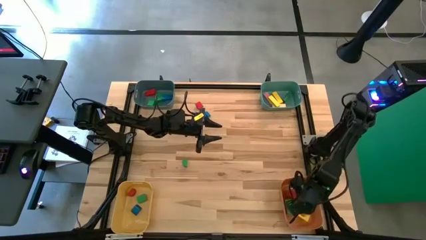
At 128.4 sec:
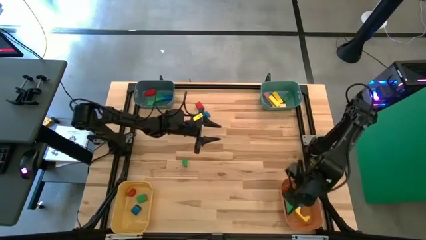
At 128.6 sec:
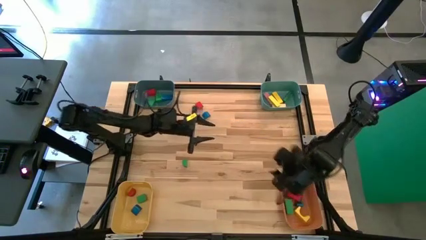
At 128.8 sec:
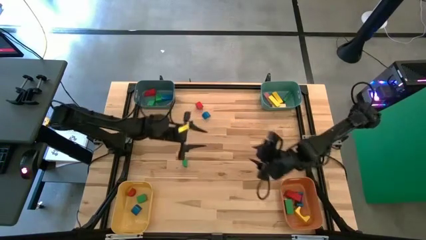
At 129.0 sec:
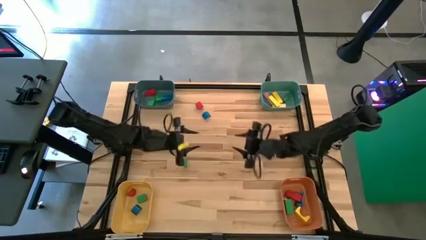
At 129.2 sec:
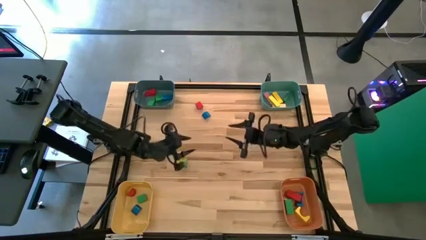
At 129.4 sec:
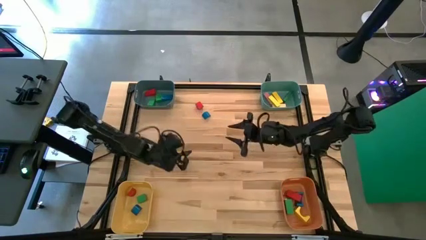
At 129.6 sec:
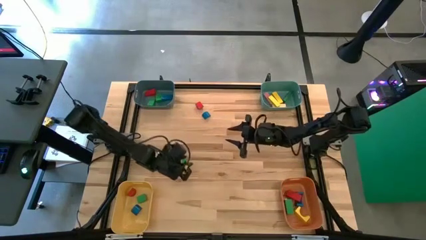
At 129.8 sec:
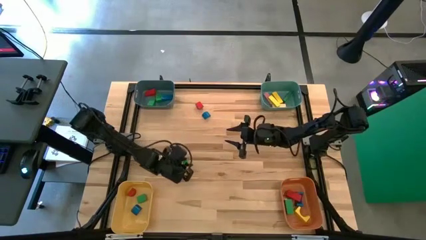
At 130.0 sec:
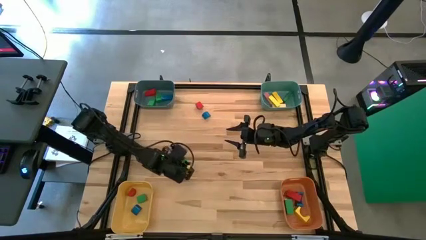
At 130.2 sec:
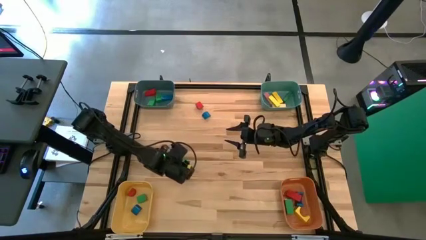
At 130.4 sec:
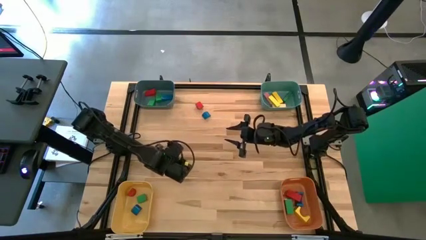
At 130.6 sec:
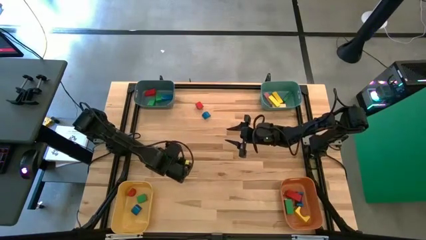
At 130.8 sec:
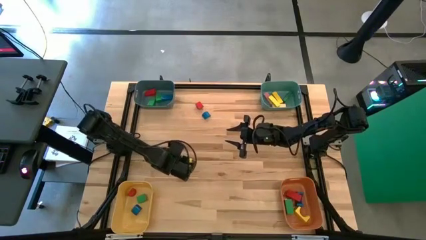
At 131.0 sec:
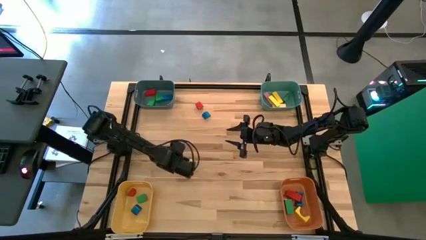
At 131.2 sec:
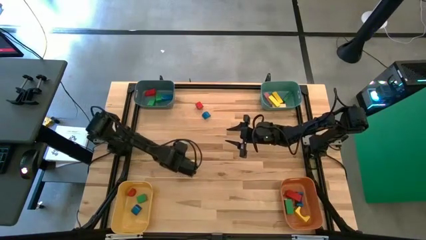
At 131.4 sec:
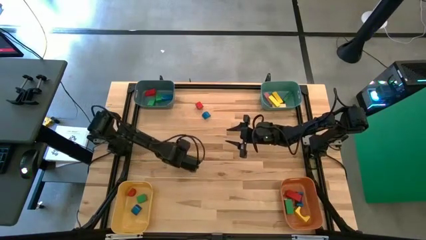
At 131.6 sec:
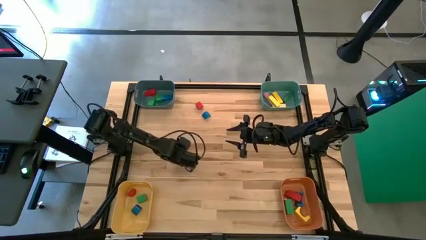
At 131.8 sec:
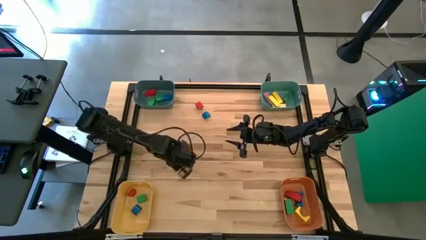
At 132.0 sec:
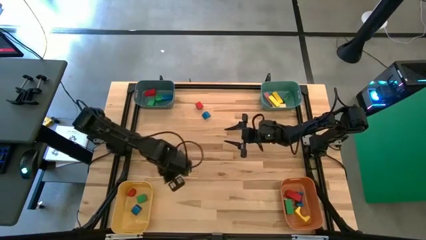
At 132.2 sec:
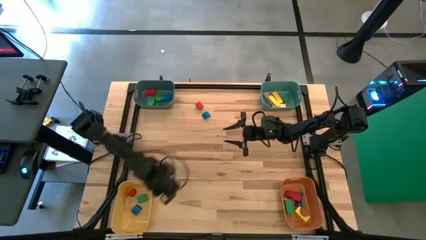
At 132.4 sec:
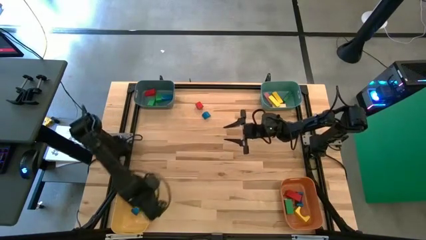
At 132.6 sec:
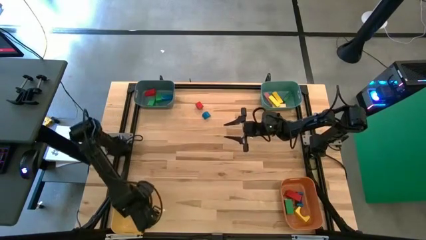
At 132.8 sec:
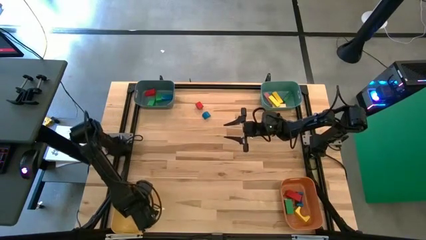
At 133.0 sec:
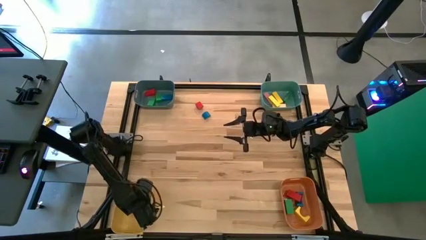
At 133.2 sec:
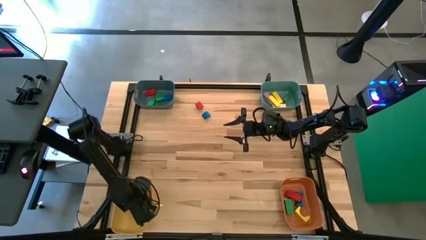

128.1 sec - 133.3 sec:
Task: Sort blocks by size
Put the green half-circle block into the yellow bin

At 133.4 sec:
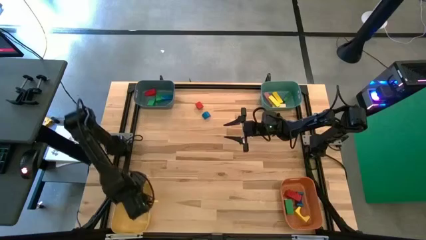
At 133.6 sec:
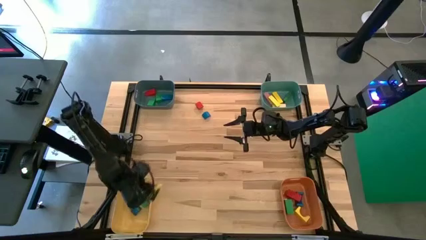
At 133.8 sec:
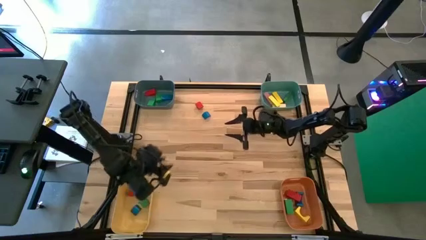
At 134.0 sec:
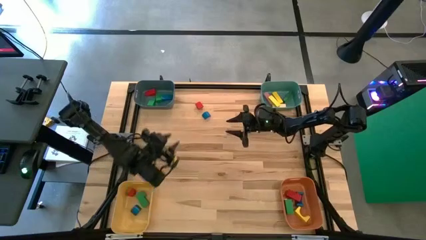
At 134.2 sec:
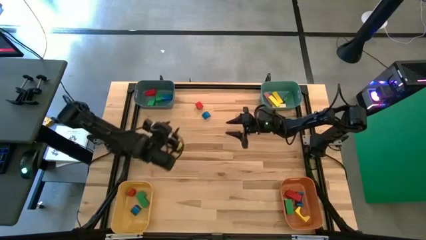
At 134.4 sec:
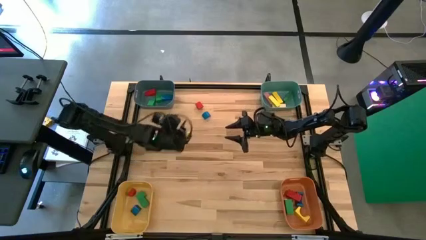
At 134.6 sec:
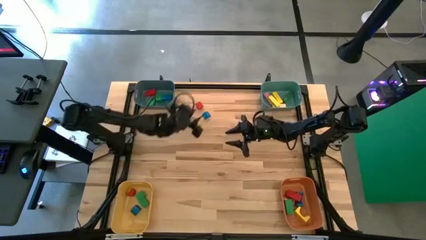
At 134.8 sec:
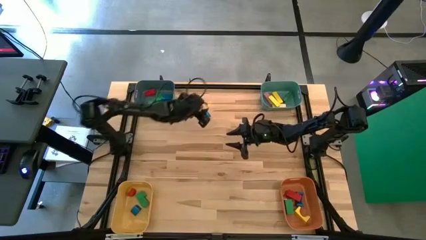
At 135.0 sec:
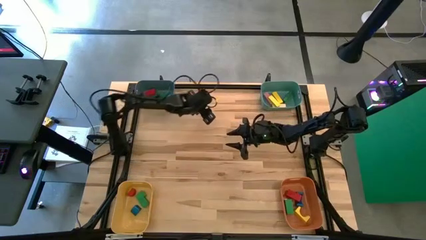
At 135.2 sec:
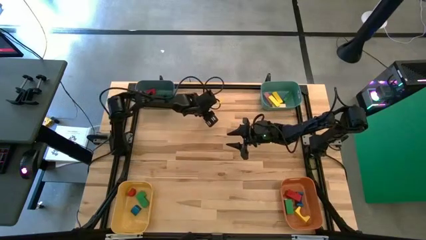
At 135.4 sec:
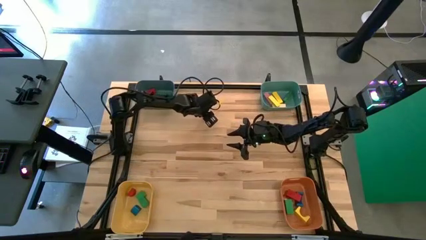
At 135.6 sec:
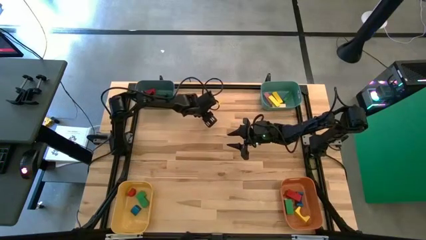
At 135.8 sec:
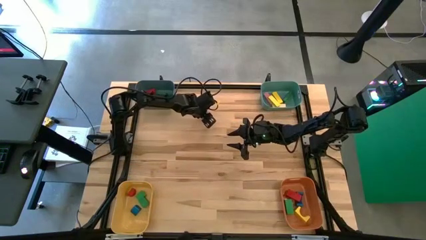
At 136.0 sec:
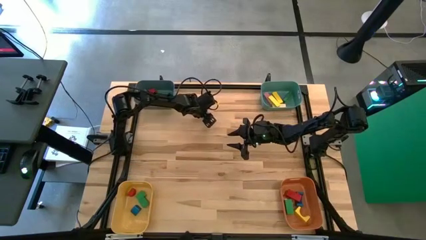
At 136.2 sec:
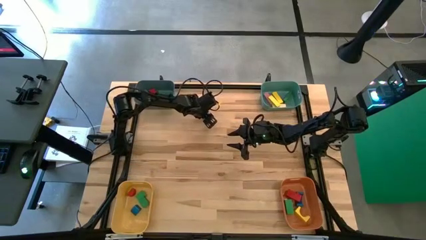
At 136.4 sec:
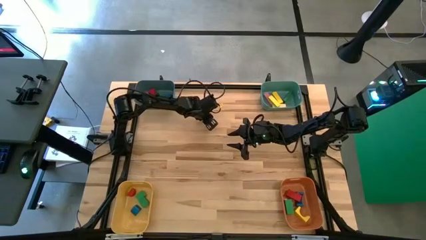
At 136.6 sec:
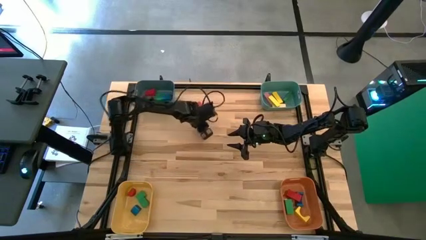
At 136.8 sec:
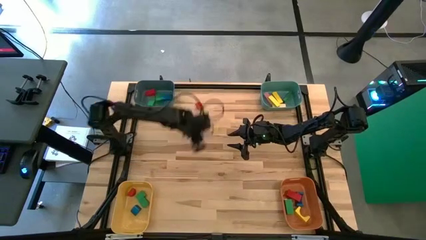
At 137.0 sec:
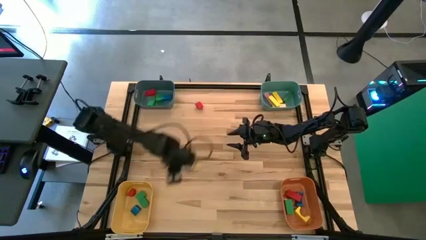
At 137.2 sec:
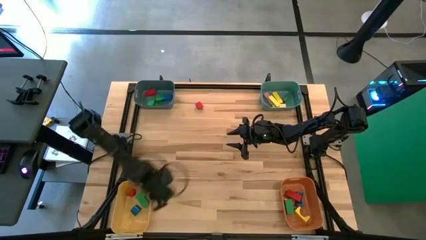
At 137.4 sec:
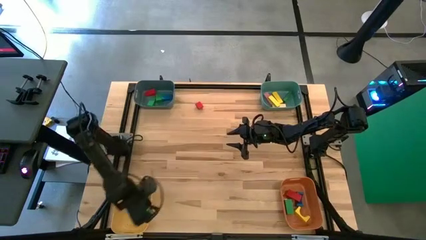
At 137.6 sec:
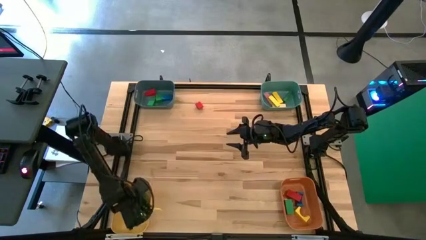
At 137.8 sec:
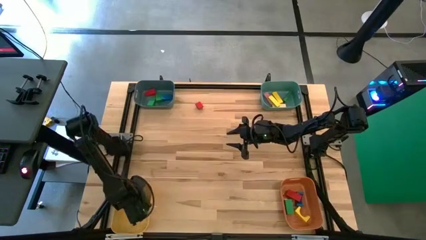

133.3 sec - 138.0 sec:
Put the blue half-circle block into the yellow bin

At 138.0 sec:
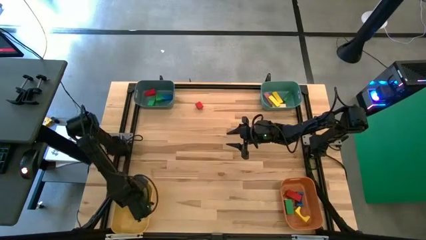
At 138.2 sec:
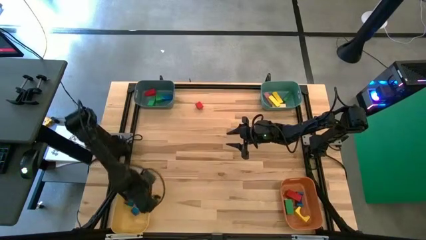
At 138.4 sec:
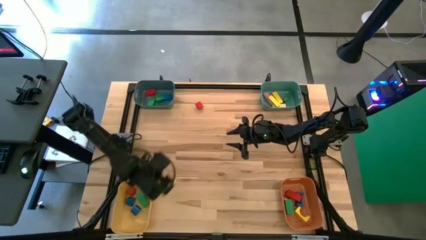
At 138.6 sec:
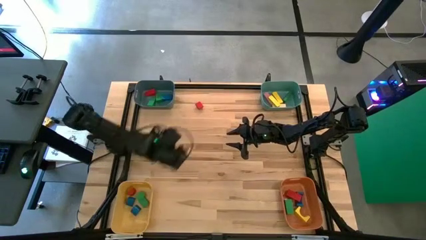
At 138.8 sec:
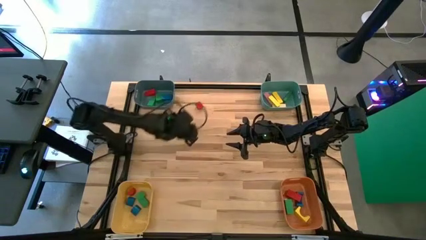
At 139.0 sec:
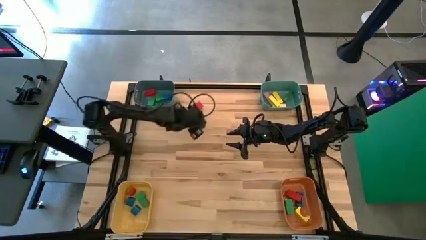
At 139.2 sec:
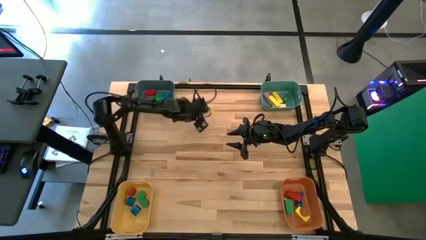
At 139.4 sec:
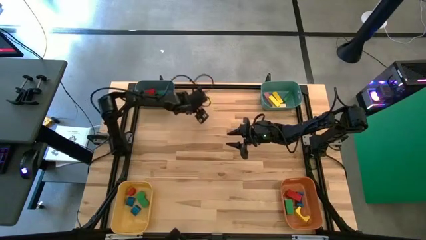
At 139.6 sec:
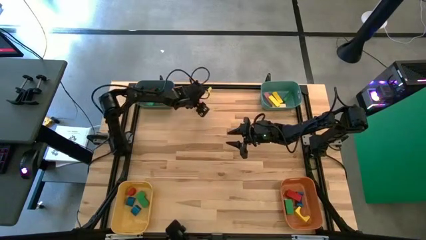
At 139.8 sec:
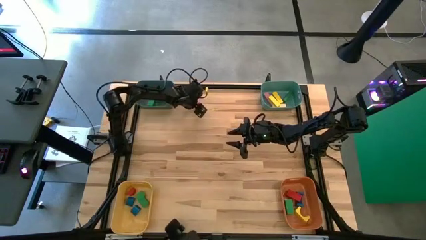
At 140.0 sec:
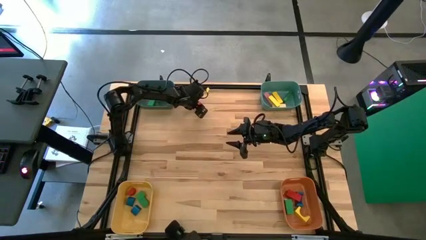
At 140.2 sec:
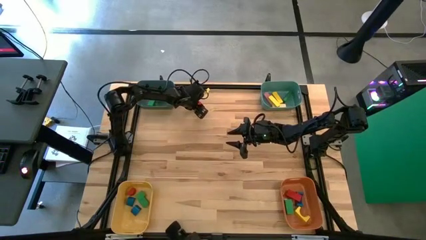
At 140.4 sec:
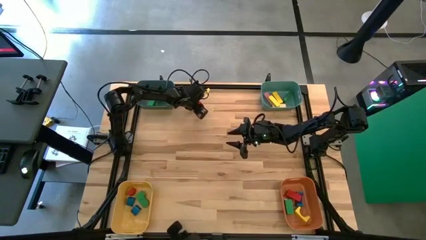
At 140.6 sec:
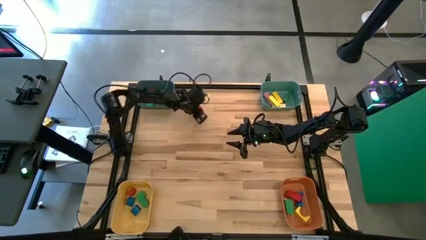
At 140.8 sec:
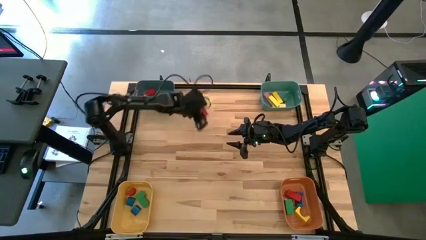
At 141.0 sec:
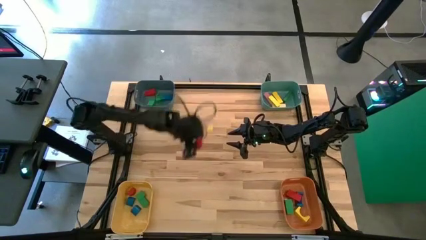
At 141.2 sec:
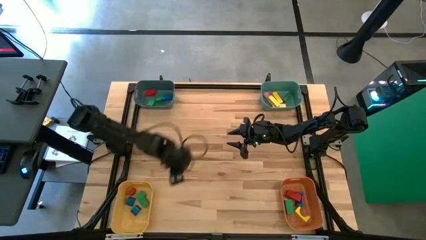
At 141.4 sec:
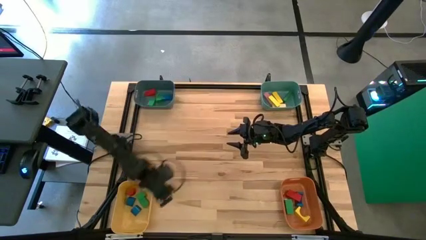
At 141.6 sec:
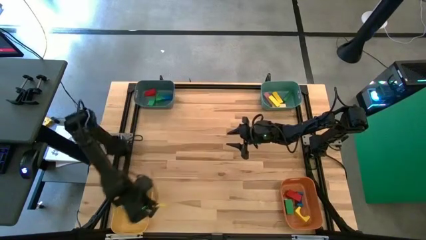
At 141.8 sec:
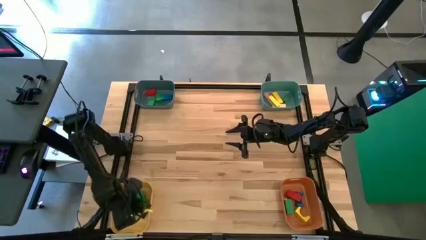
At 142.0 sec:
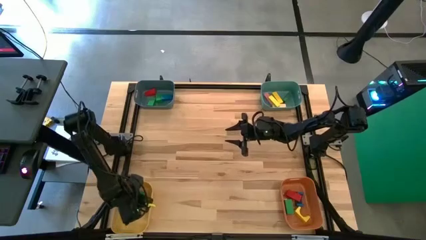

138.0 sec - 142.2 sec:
Put the red half-circle block into the yellow bin

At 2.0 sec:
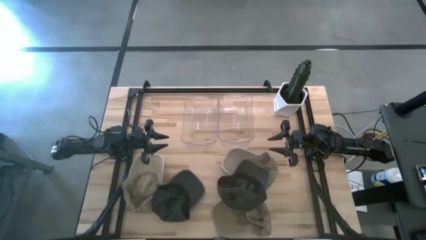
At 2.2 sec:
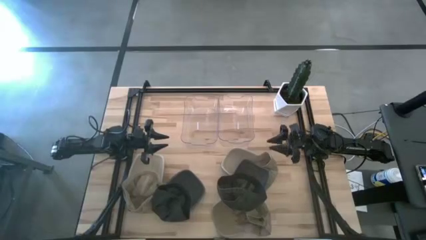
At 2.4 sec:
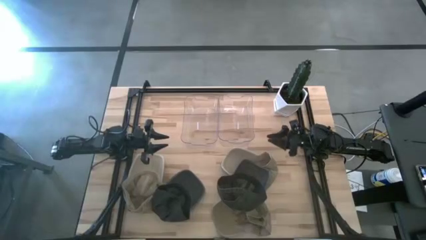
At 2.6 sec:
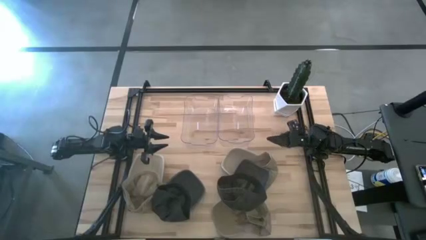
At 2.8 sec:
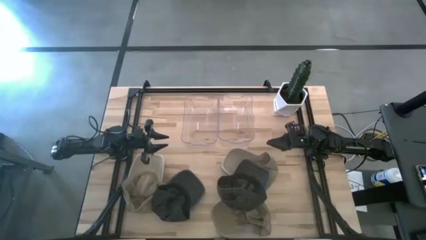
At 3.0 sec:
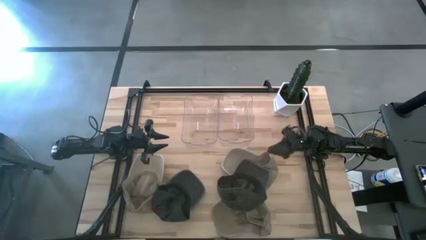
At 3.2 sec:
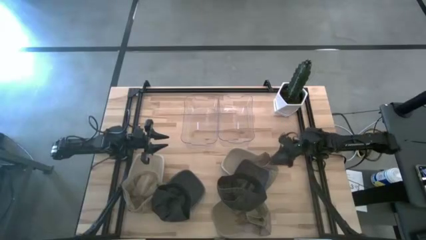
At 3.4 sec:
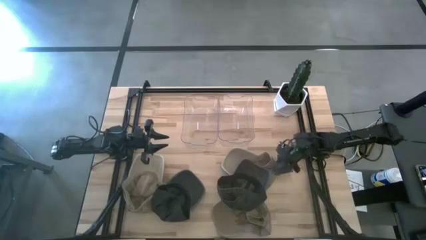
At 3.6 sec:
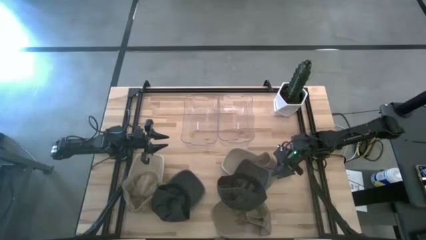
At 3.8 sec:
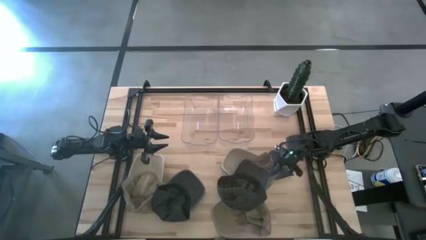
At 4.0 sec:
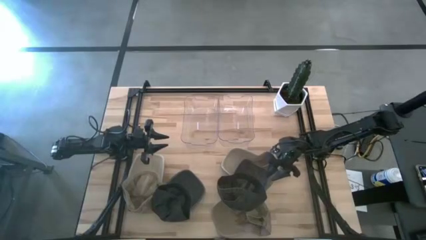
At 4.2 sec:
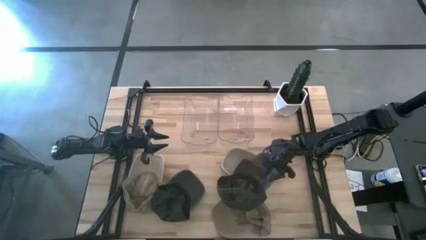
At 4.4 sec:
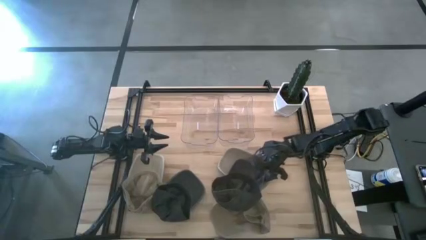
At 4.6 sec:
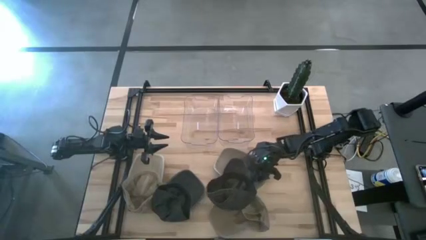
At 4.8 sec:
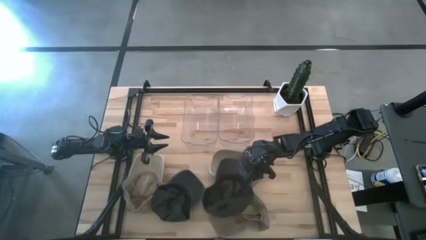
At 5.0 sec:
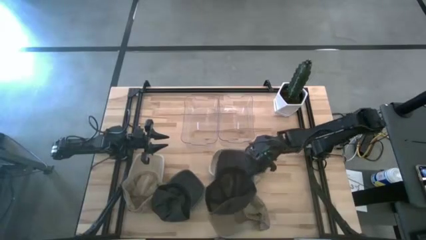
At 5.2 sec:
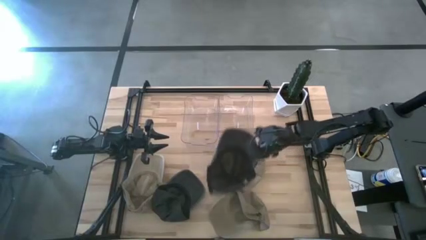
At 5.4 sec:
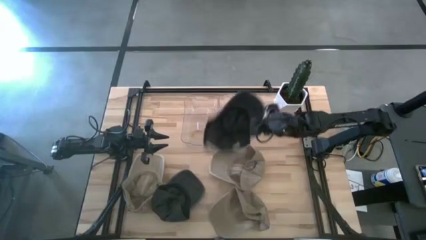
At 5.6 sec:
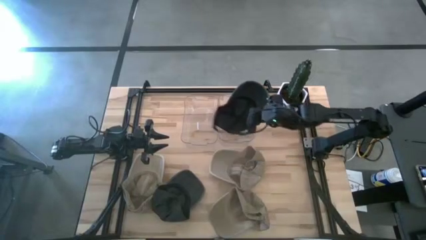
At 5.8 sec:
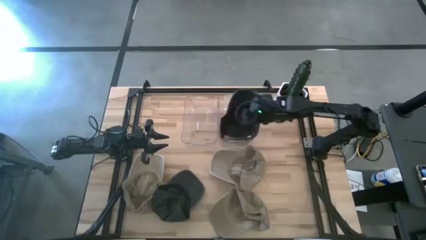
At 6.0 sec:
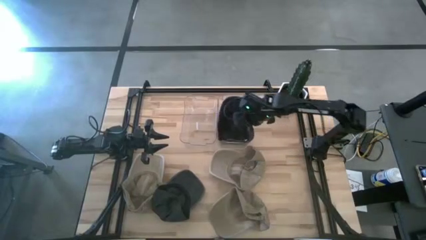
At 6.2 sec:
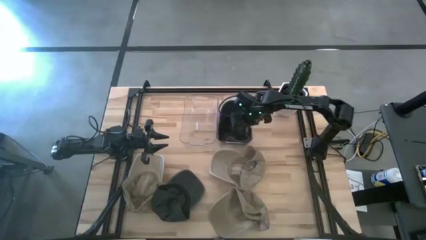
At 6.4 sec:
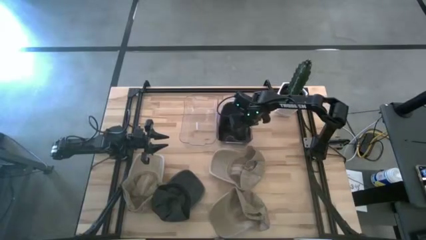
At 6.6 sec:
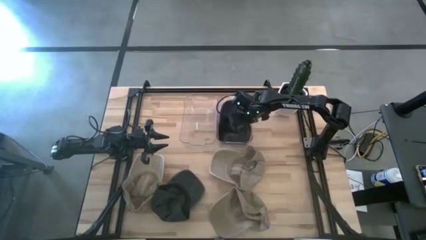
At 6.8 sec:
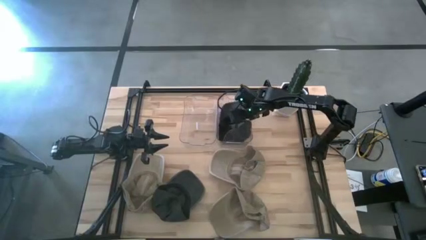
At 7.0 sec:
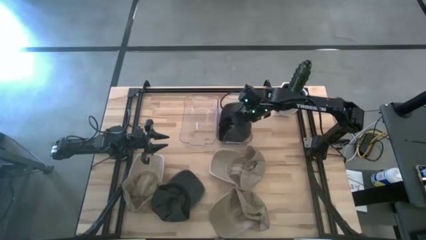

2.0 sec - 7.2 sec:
Task: Pick & Place hat
Put the right black cap into the right transparent bin
